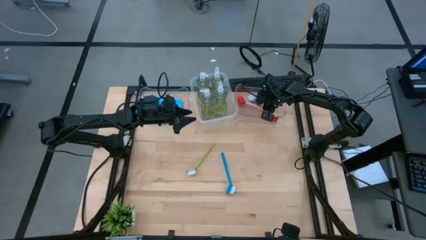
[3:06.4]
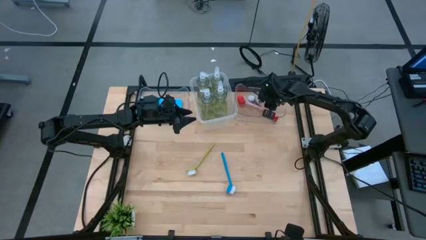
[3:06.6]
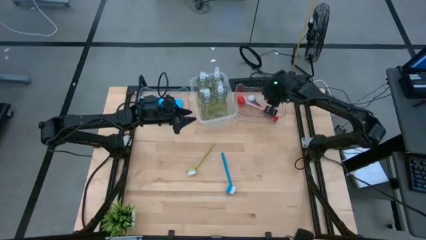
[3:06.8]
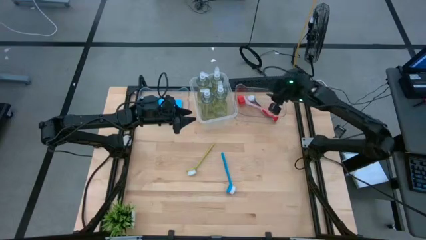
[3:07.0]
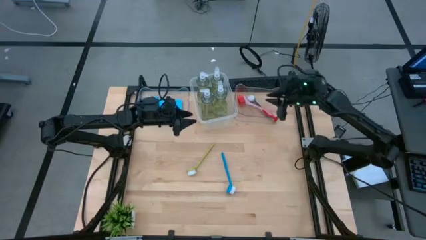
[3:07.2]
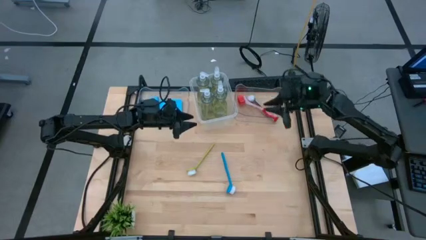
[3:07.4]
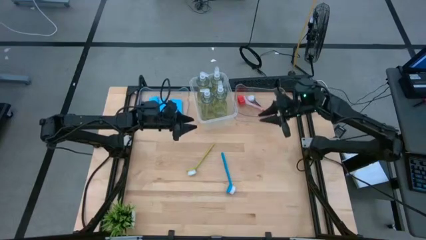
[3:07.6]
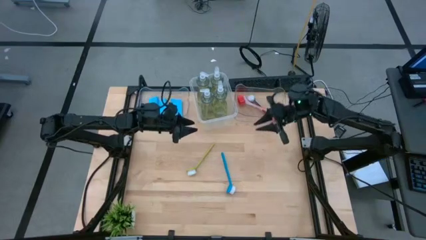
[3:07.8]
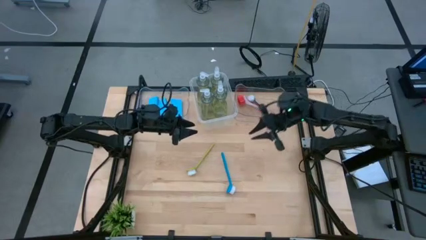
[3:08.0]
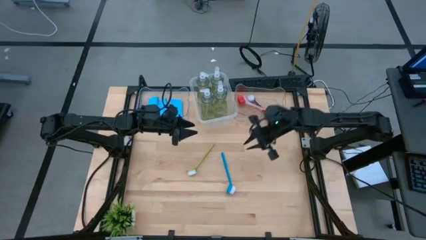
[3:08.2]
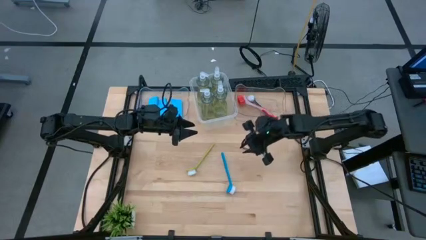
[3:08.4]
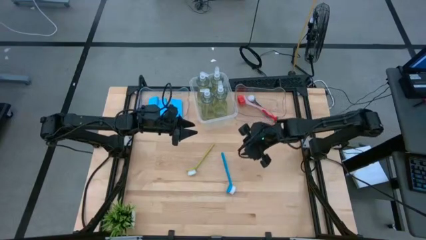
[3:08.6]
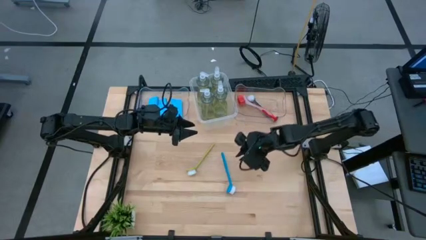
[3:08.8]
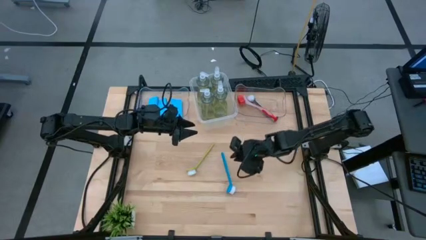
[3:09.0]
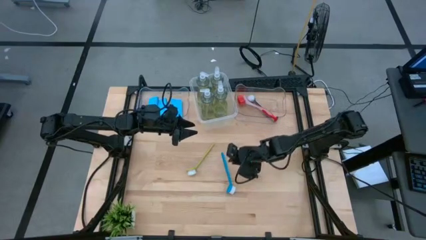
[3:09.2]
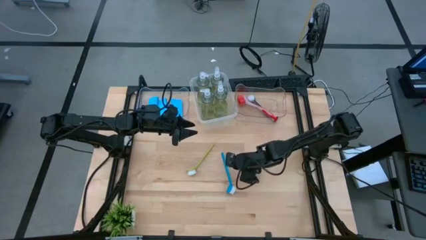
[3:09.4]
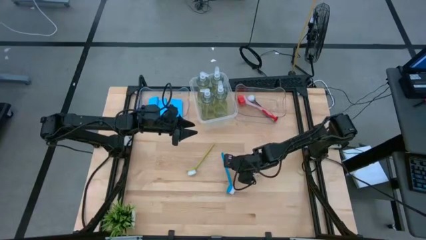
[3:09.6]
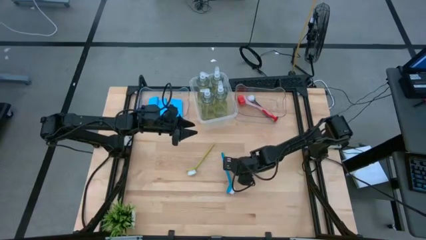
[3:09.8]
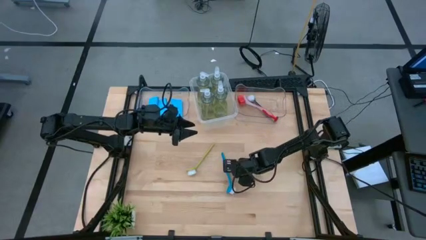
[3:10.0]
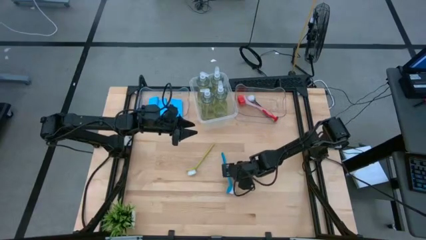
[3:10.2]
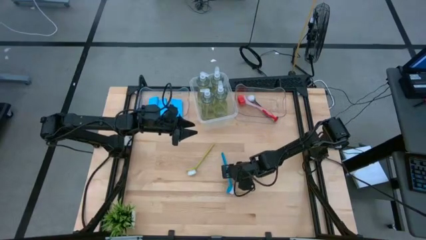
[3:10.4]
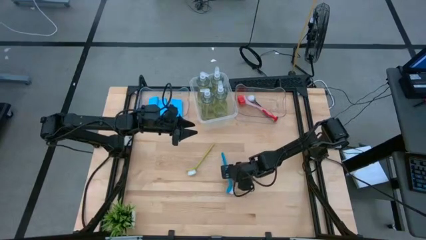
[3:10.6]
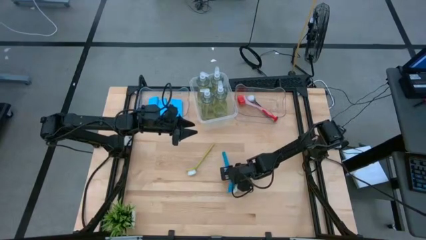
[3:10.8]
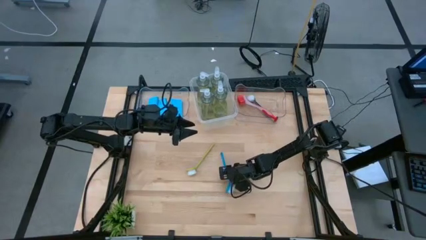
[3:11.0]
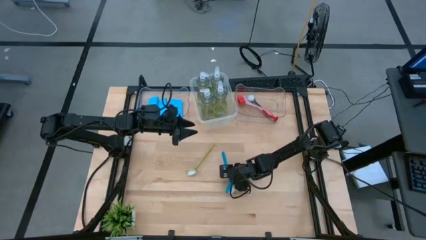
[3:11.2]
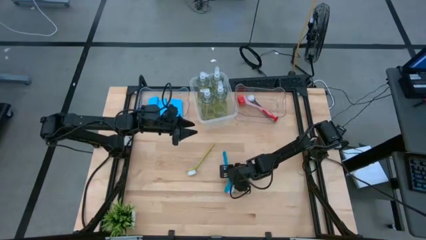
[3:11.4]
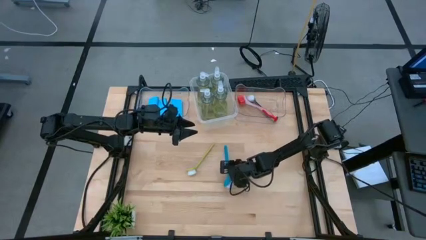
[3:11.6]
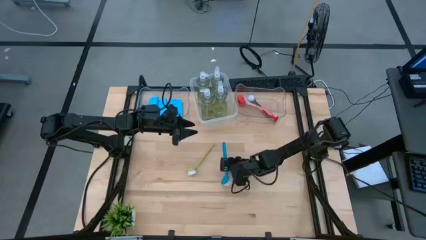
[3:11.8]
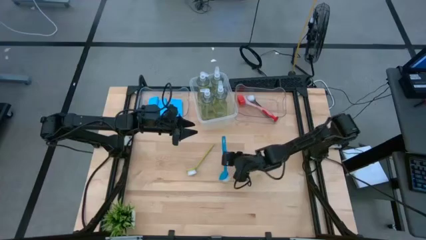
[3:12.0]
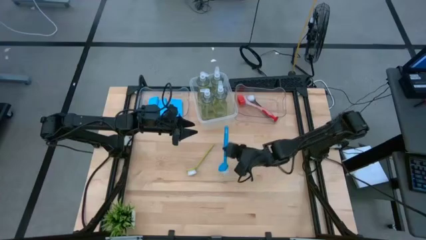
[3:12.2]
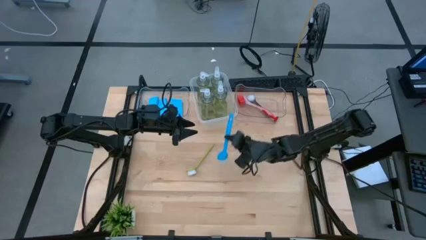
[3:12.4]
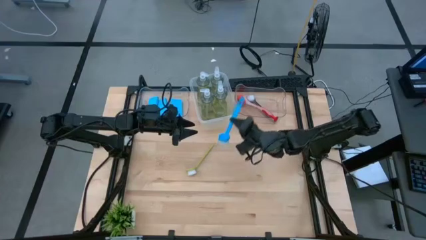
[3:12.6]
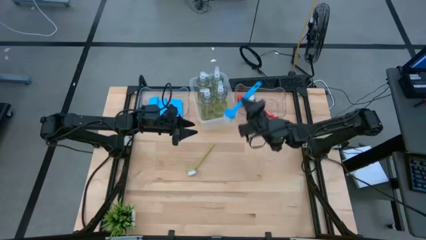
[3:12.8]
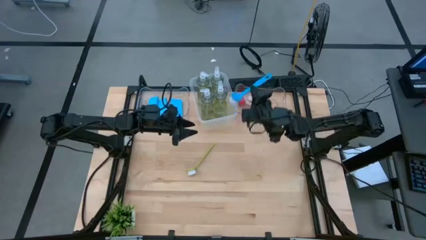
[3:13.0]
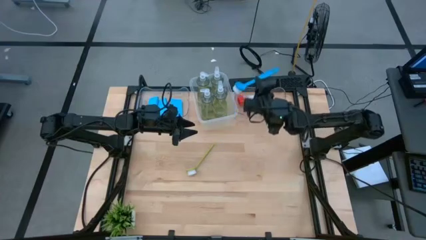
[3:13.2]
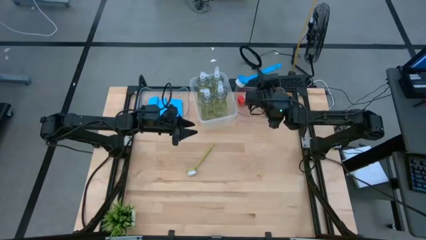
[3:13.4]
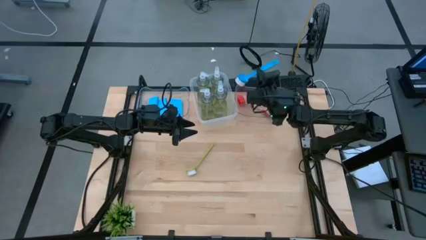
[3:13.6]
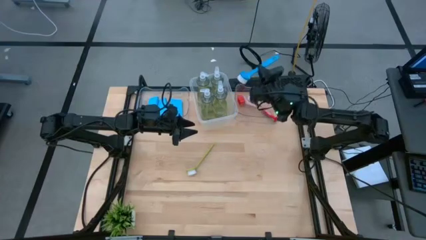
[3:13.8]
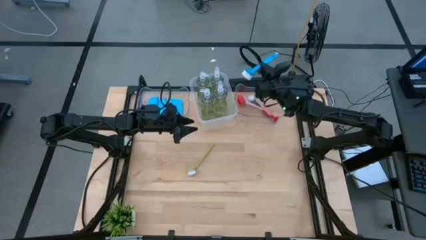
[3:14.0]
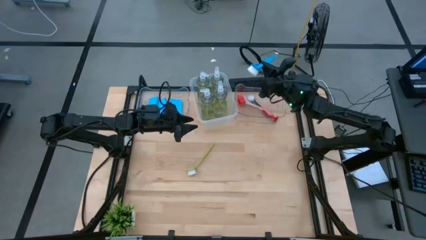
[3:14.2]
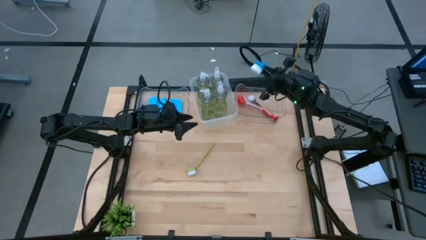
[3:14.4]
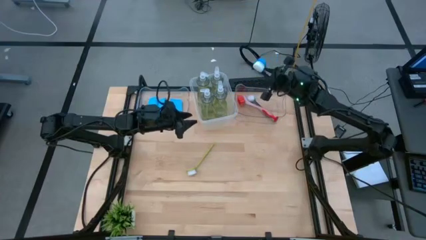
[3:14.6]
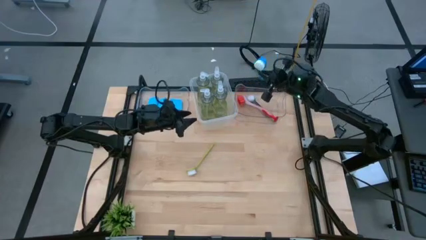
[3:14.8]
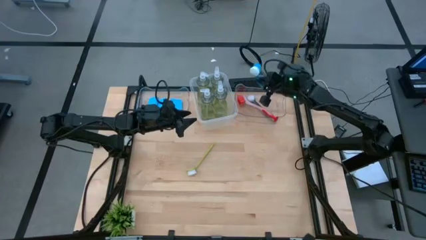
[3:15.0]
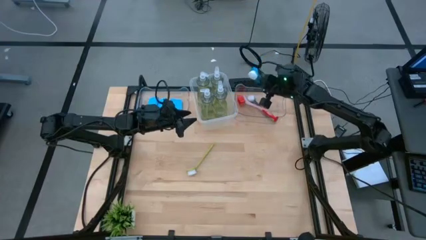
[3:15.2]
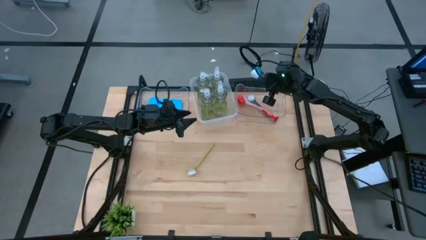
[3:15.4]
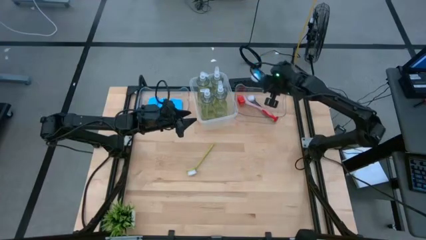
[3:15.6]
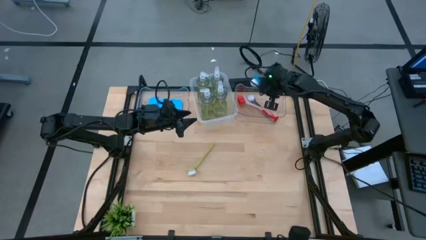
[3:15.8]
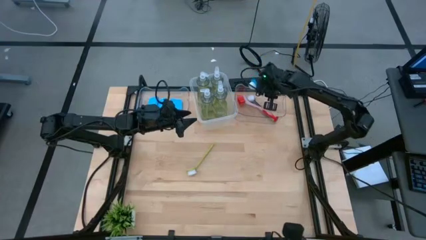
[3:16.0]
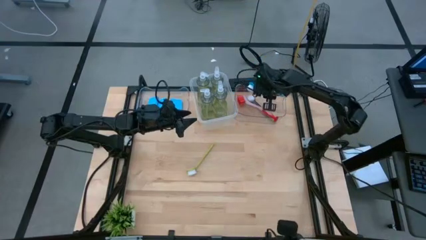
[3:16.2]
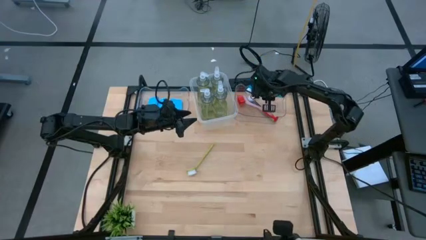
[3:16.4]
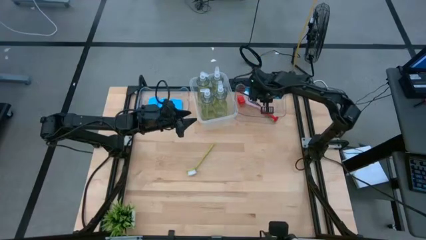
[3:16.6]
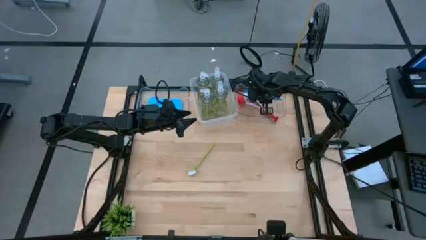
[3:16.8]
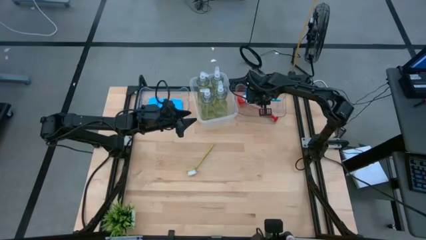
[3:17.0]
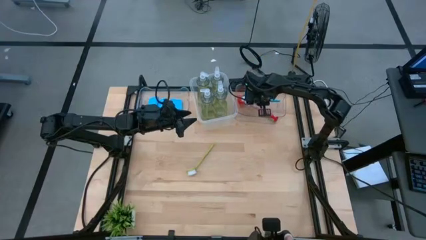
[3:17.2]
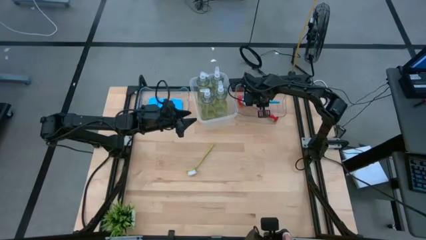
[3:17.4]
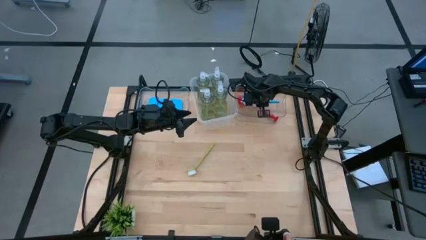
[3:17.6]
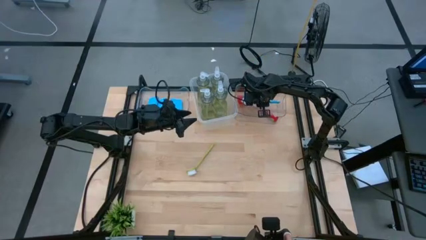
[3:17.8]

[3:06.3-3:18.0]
Task: Pick & Place Kitchen Sink Supplies
Put the blue dish brush into the right transparent bin

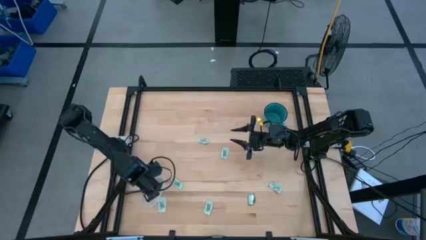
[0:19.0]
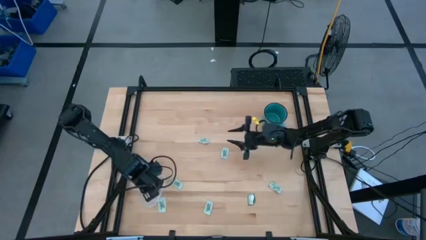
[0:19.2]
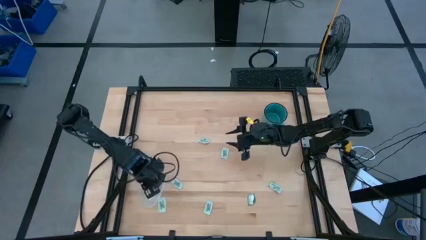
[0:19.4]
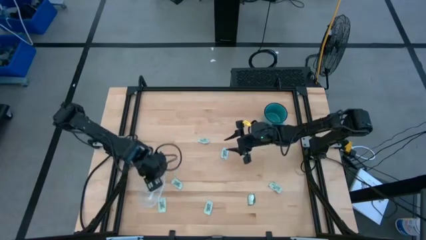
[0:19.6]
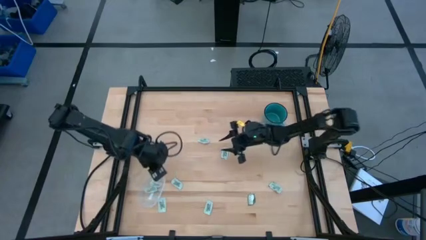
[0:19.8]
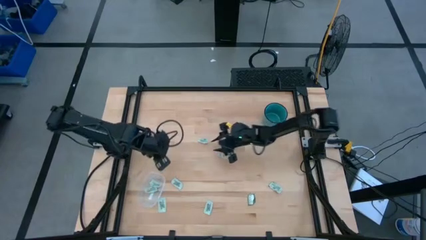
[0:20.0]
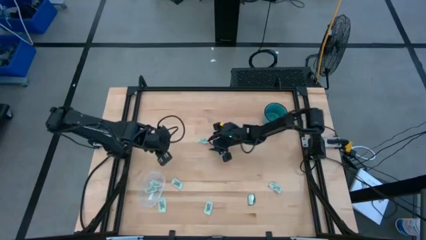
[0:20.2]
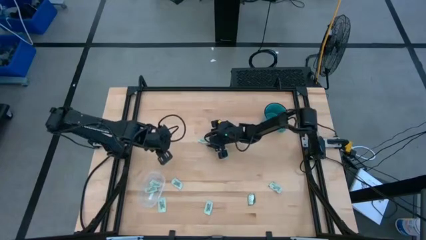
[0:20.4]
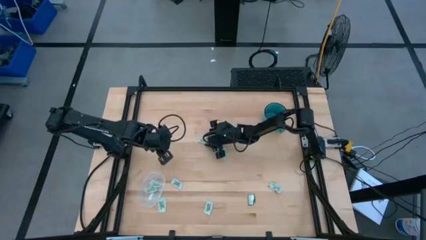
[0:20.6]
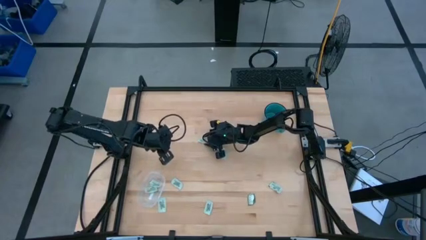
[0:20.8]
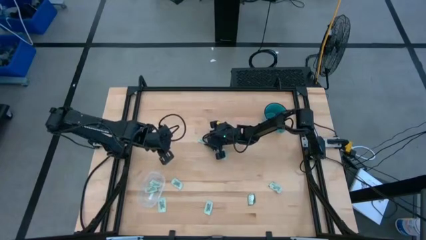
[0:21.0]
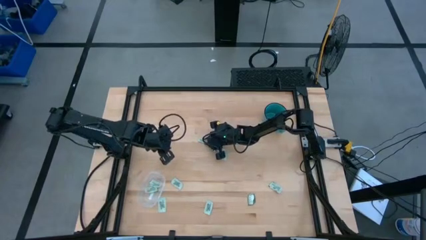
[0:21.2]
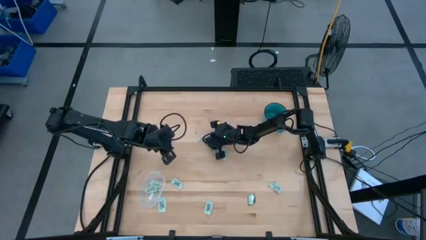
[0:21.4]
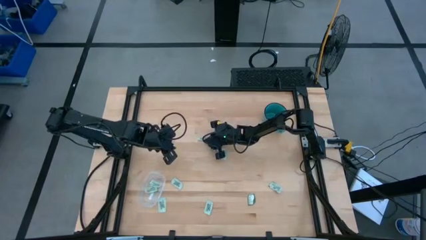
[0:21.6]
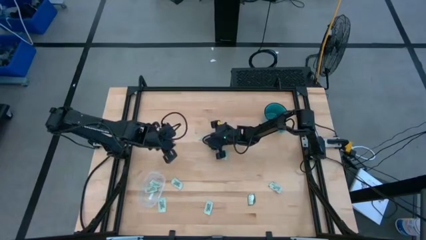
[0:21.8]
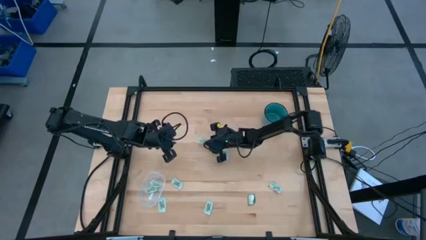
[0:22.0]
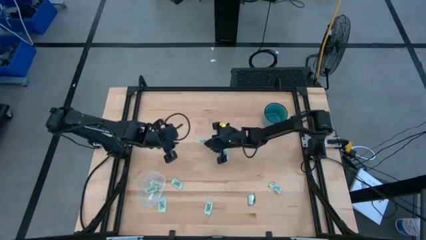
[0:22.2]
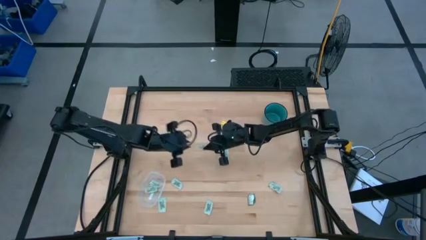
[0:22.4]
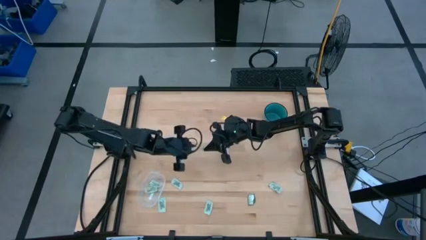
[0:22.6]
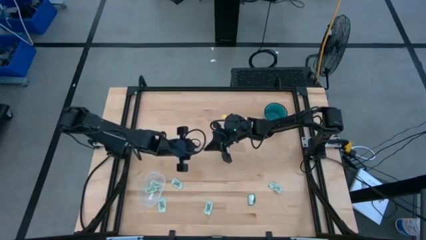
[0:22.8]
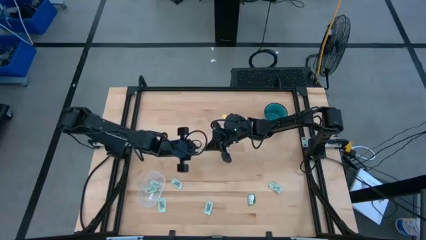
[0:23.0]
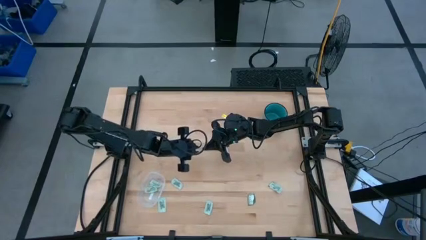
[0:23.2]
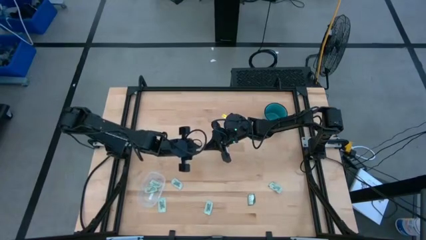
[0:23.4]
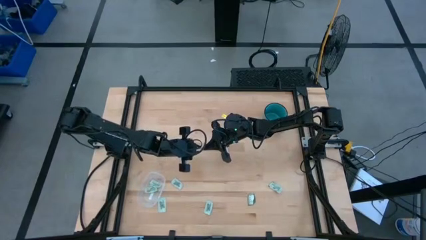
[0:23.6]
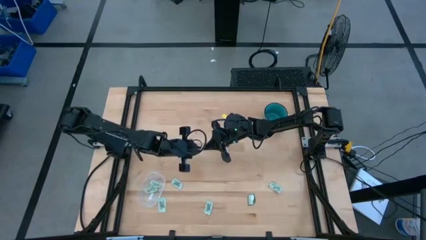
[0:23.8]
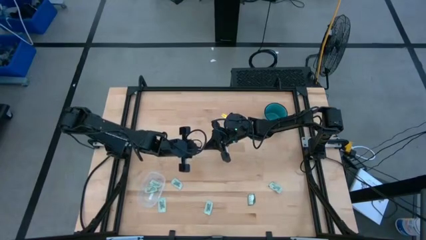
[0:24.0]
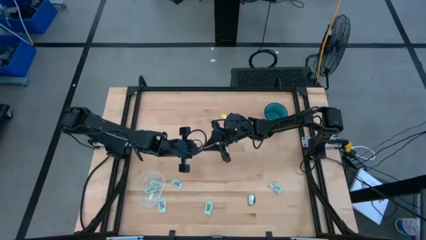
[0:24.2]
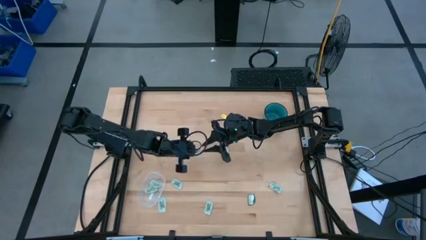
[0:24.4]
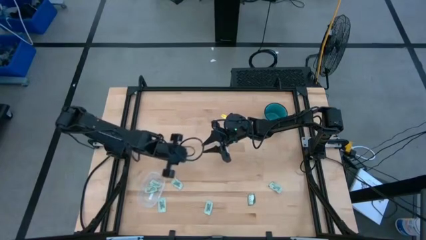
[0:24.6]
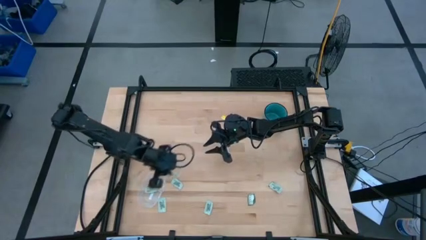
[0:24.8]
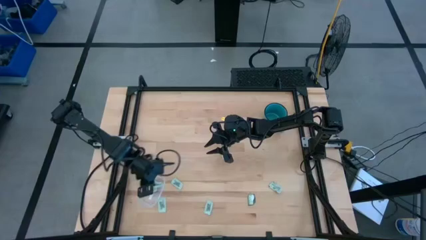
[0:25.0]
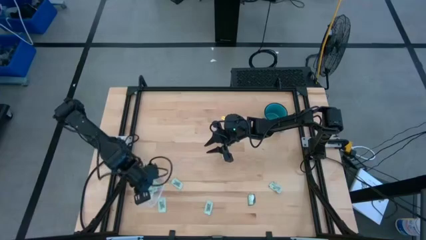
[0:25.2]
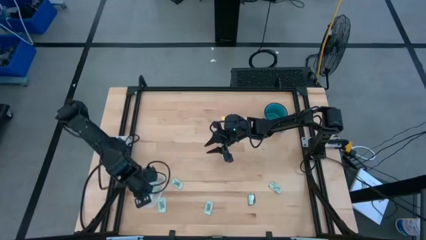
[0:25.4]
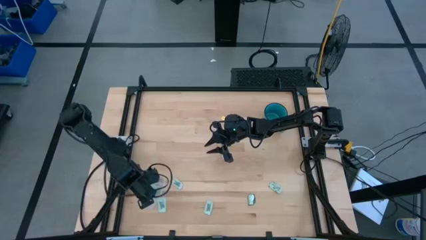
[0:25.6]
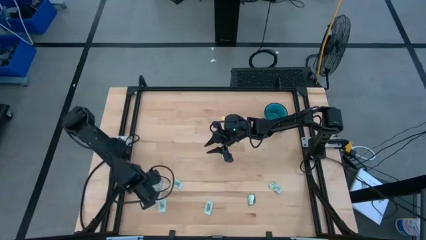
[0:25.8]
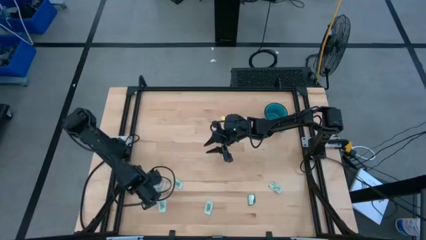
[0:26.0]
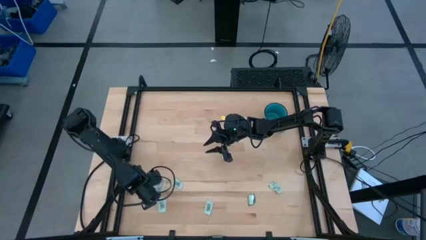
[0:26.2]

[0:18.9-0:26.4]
Task: Pick and place Stevia / Truvia into bins
Put the white stevia packet into the transparent bin
